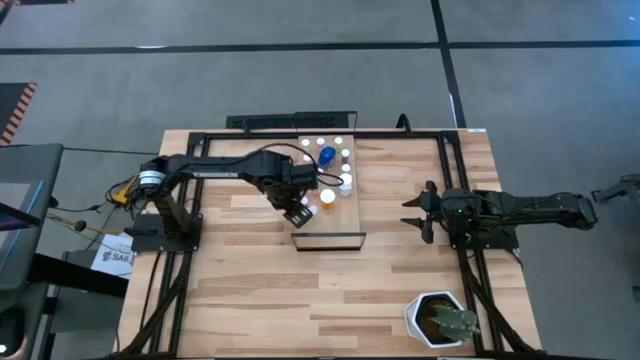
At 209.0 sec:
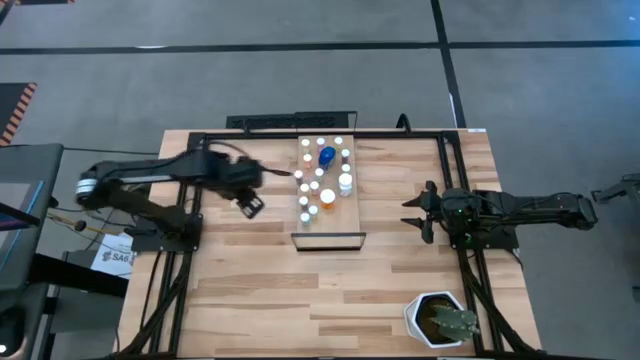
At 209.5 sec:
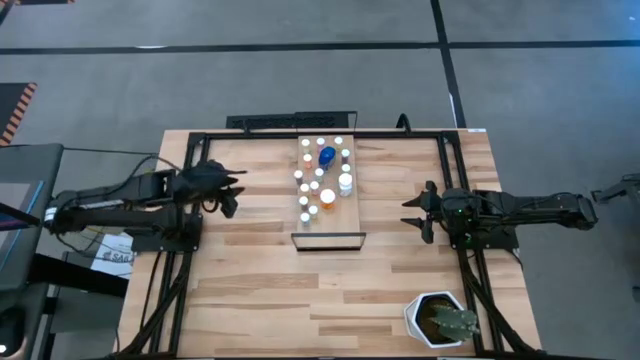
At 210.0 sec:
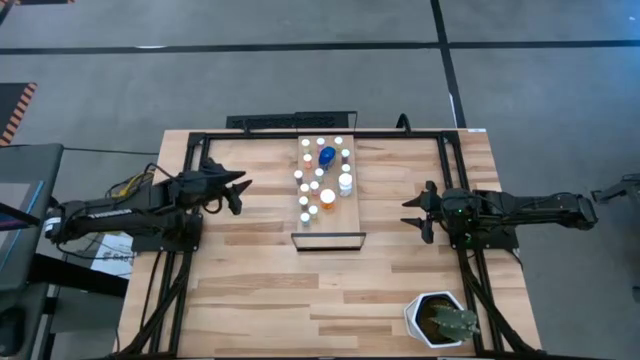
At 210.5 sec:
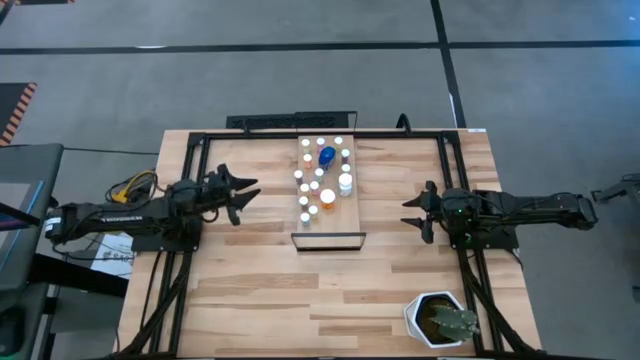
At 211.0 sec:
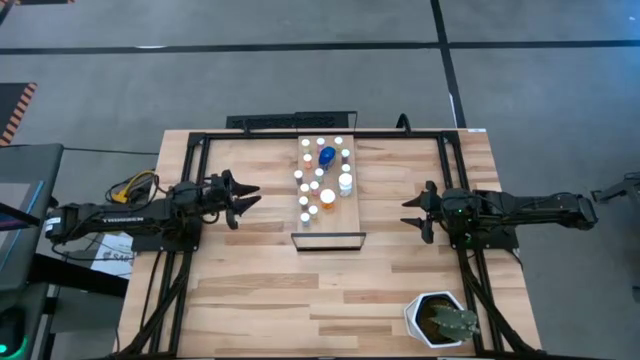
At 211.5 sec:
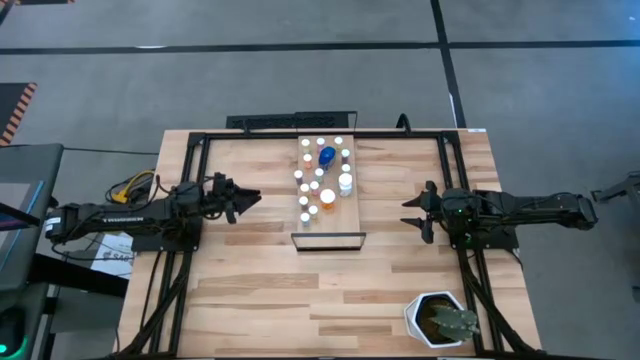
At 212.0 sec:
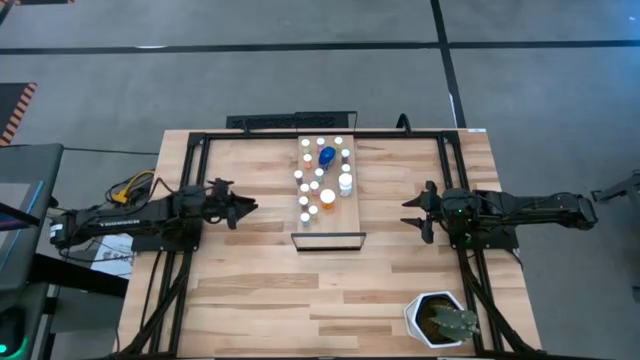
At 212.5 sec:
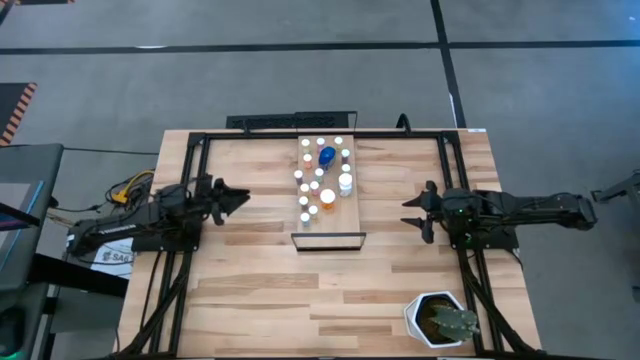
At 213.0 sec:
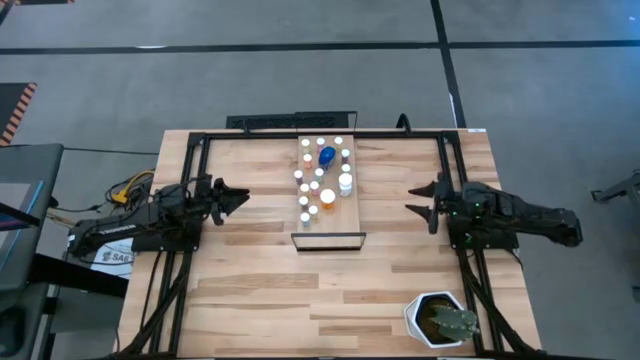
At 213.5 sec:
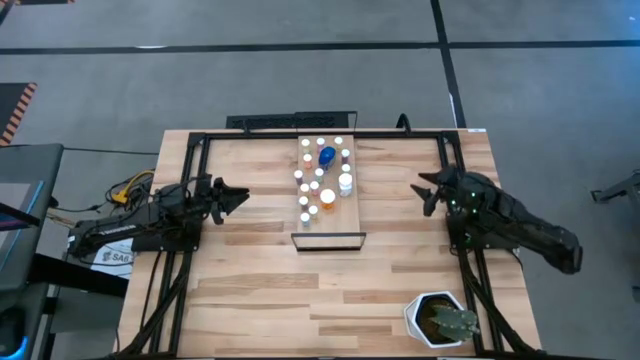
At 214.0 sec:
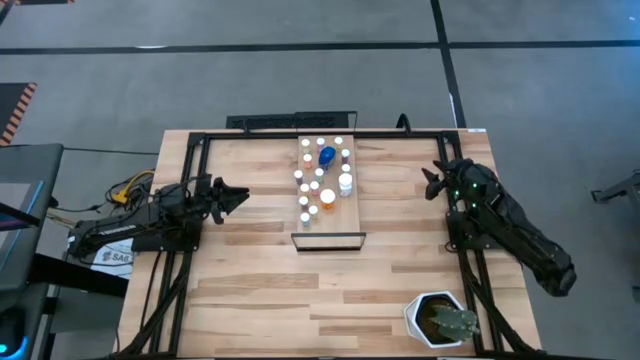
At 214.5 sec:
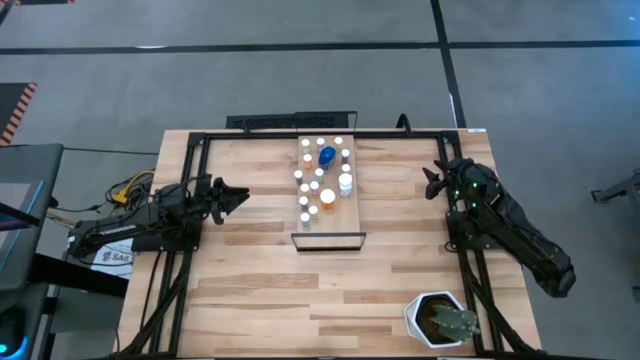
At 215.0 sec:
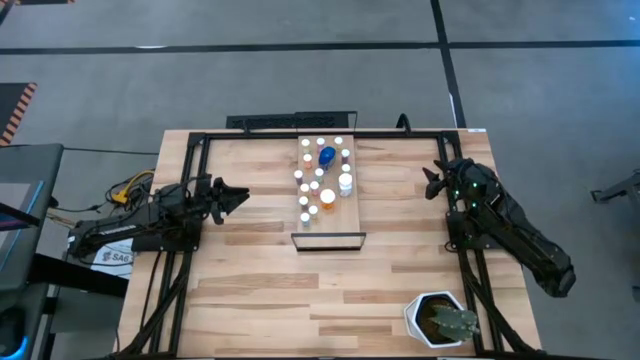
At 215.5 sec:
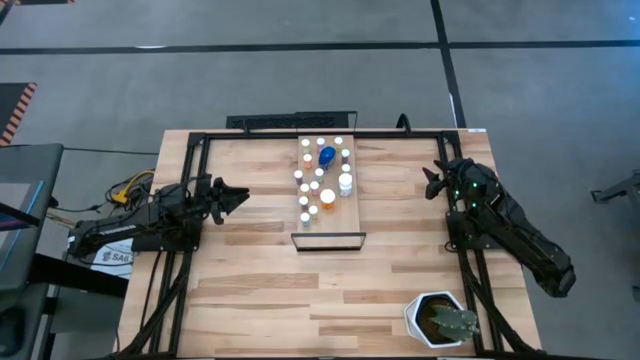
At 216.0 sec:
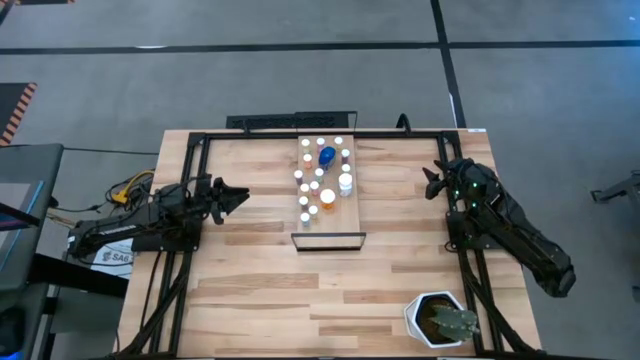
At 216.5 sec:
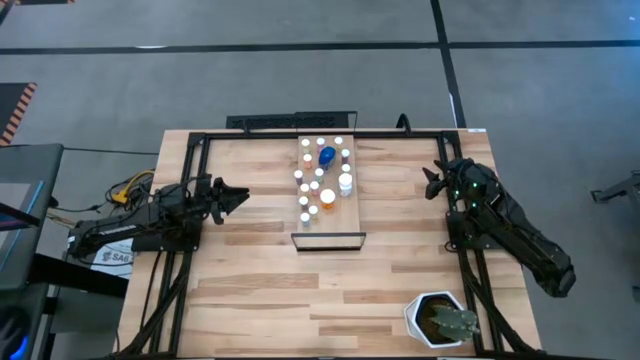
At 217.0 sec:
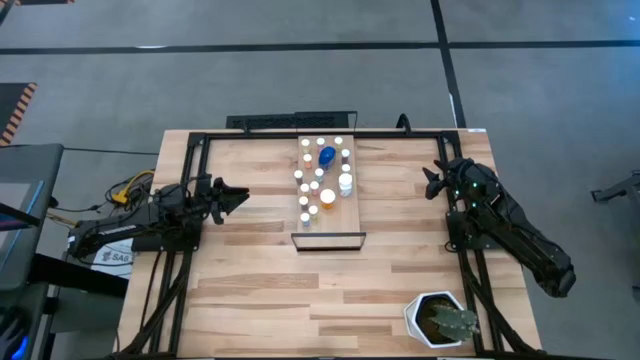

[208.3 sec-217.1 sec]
Task: Pick and place medicine bottles onto shelf by color
Return to Home Position

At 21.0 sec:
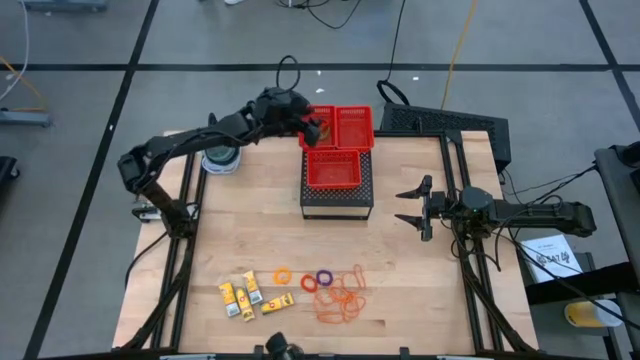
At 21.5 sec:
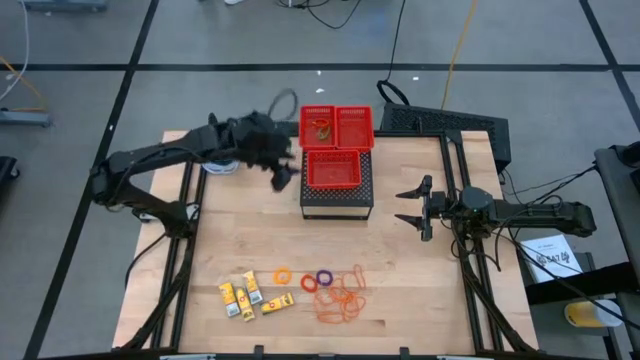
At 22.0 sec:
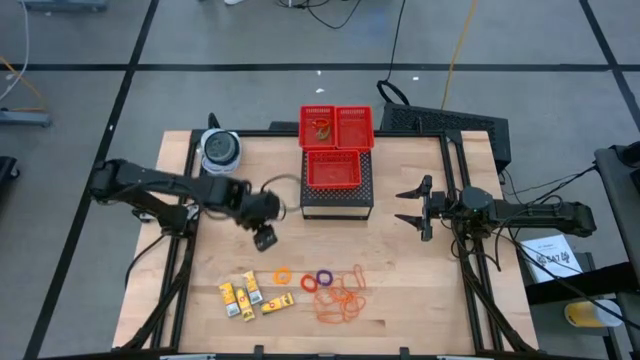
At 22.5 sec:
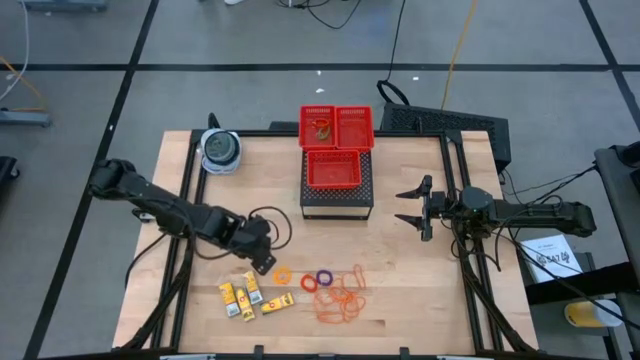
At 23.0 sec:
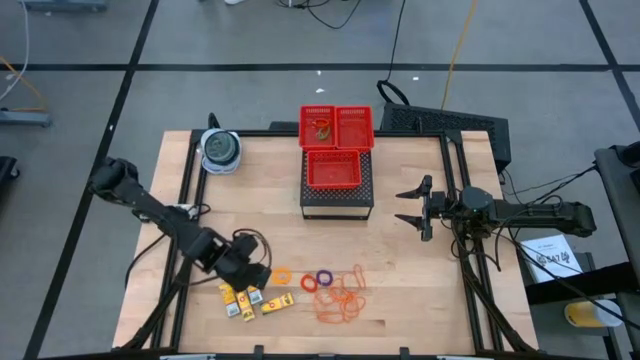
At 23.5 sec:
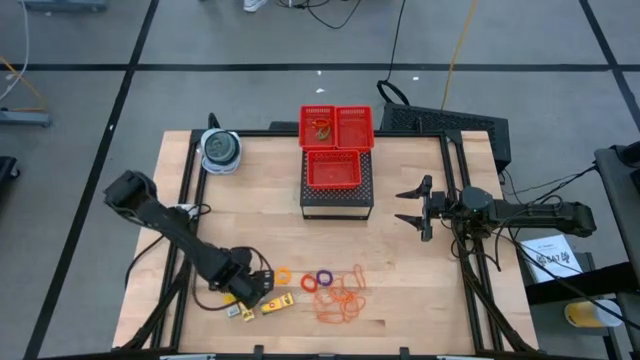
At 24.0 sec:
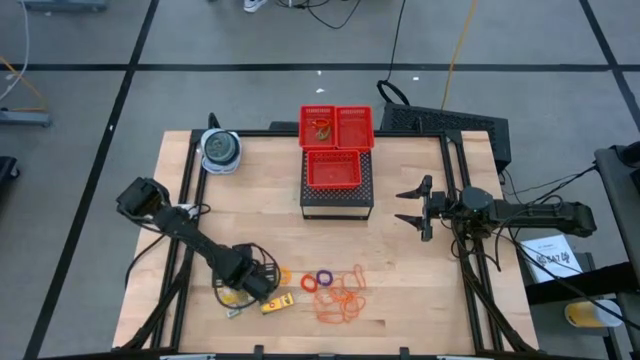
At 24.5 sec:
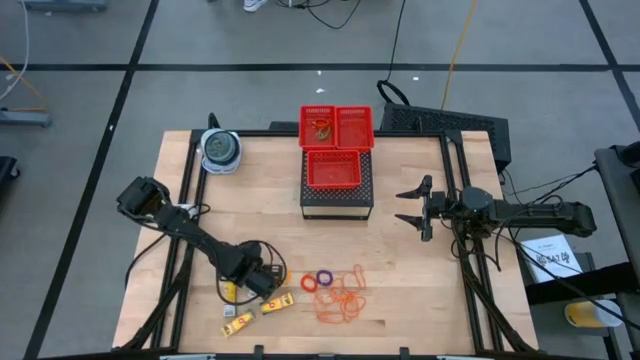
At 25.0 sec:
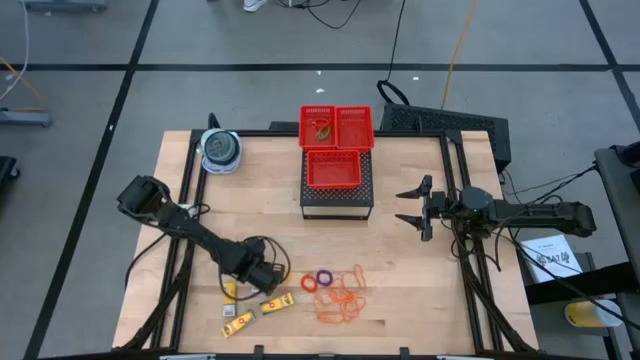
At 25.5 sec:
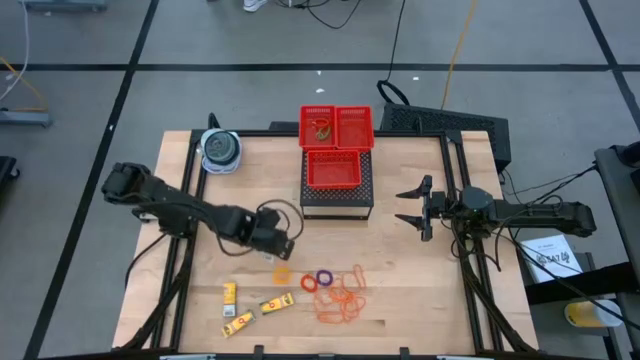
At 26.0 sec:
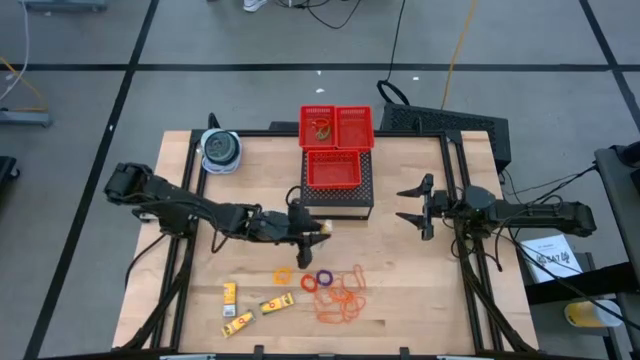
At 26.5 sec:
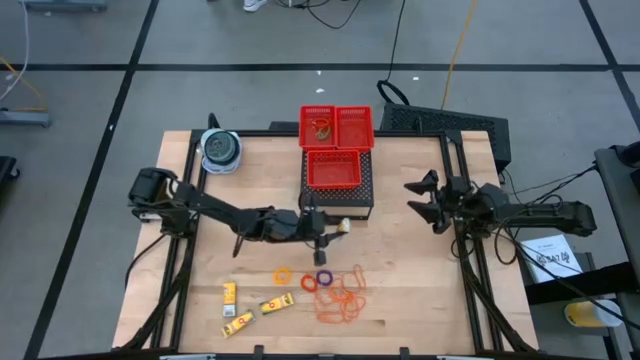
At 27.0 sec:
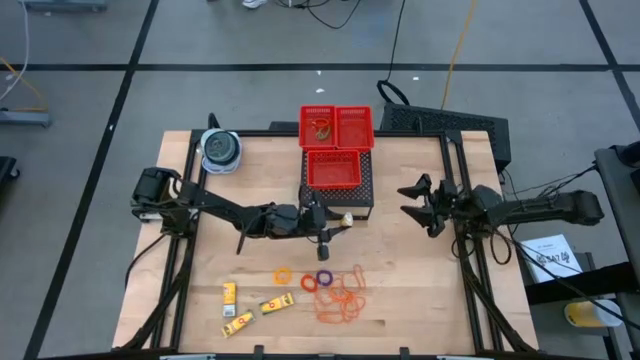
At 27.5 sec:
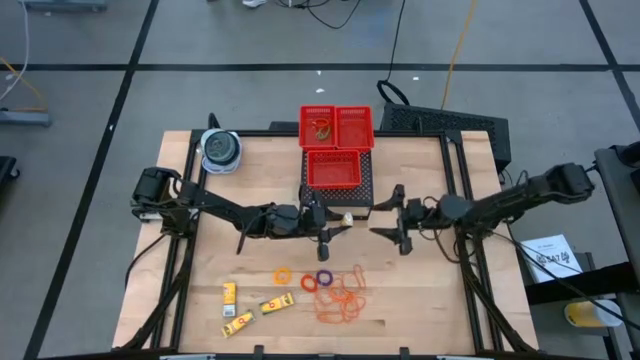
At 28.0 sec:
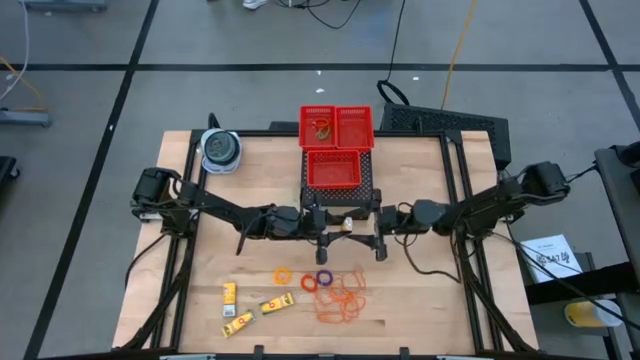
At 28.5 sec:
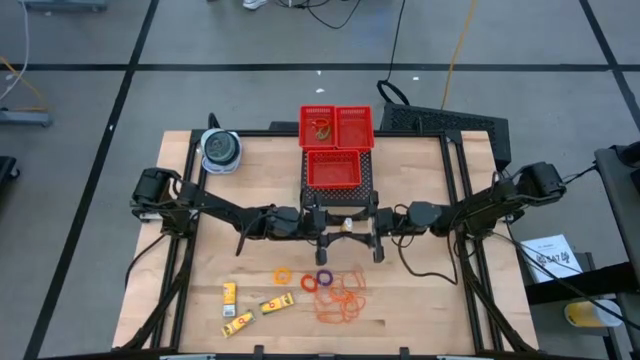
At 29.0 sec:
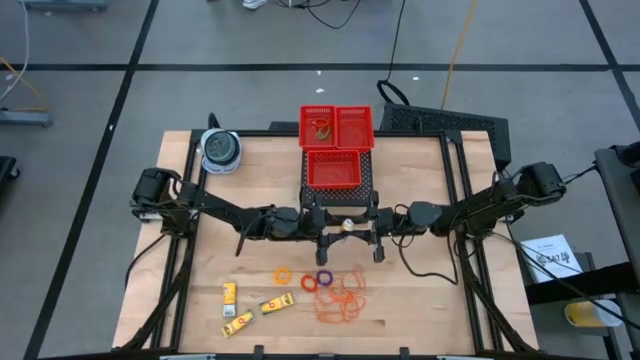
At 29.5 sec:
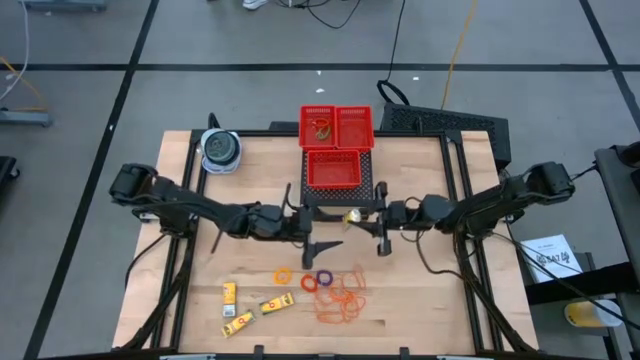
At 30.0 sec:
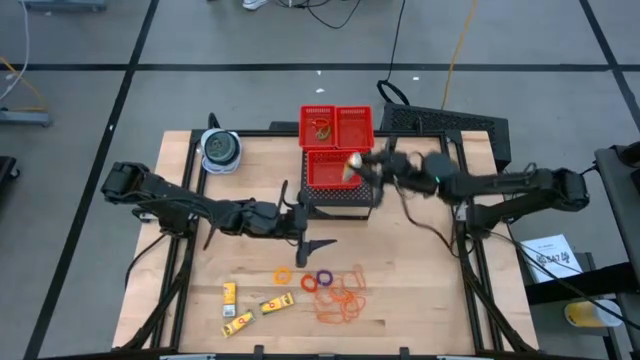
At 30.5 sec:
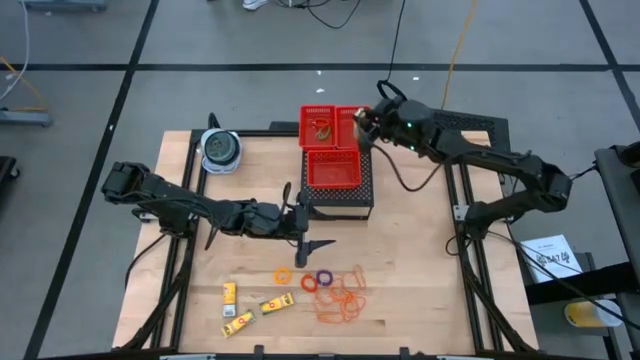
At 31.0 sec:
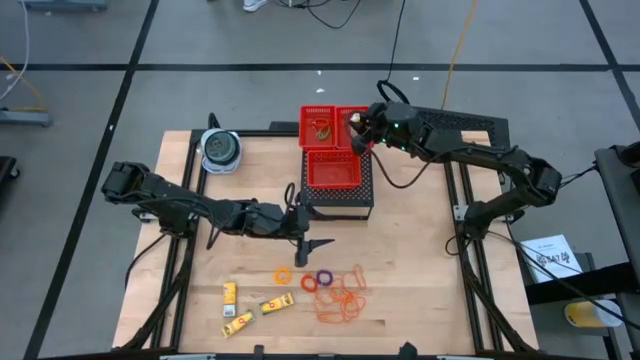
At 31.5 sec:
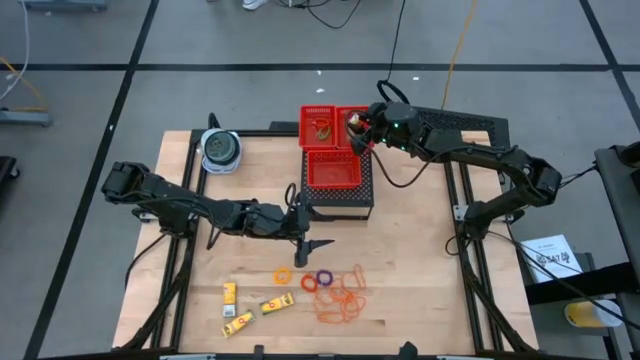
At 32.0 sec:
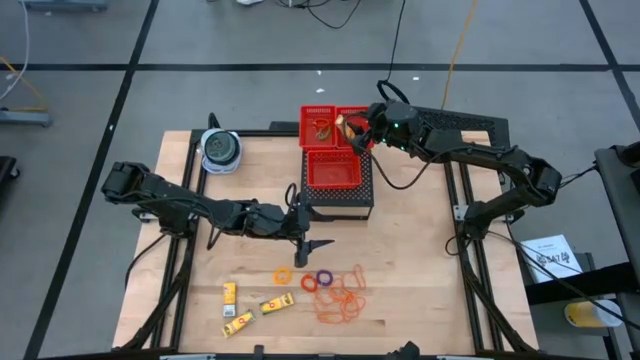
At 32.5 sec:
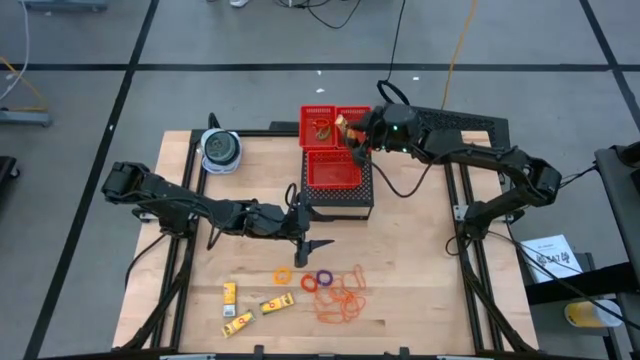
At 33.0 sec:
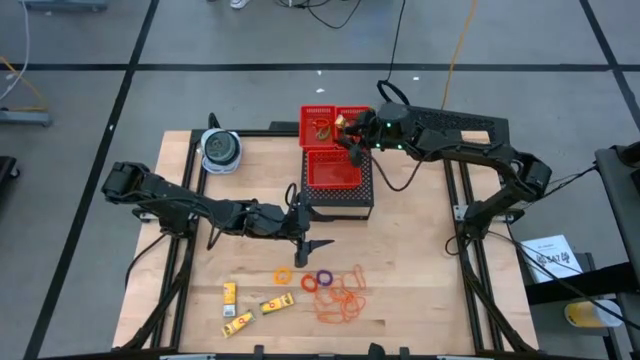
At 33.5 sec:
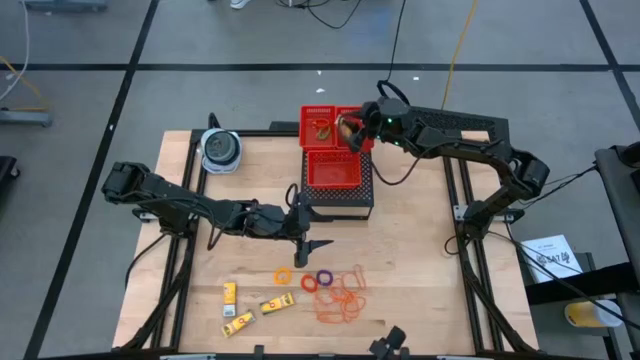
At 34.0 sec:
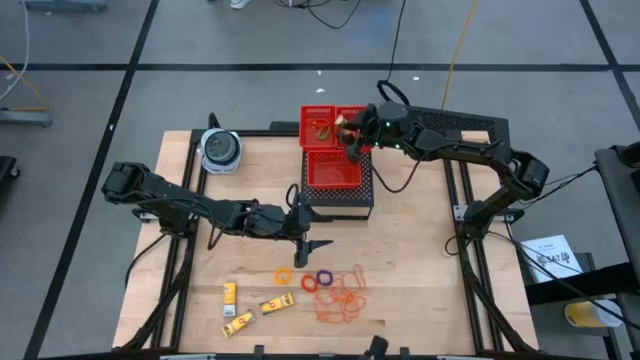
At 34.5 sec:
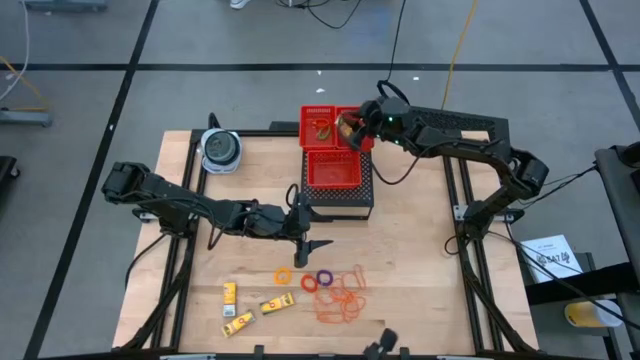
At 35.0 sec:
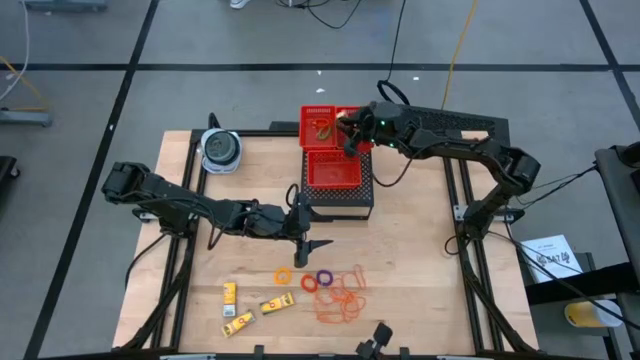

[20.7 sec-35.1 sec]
Task: Pick & Place Office Desk Supplies
Put the yellow pack of crayon in the top right red bin on the shelf
